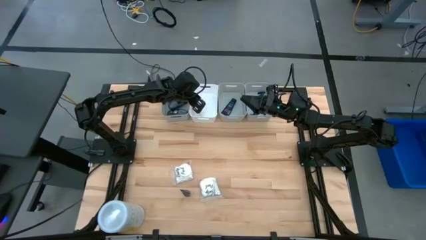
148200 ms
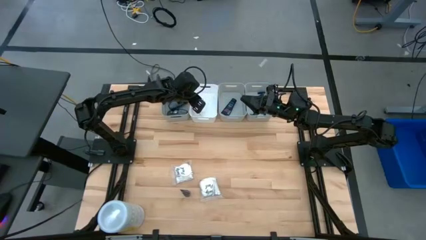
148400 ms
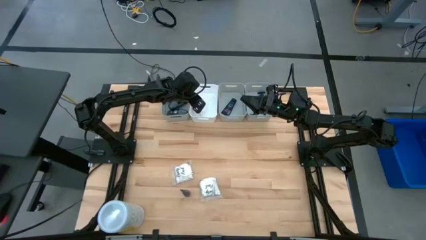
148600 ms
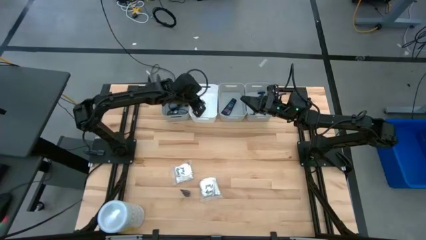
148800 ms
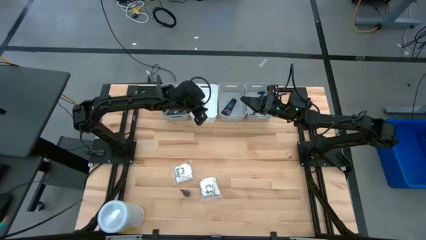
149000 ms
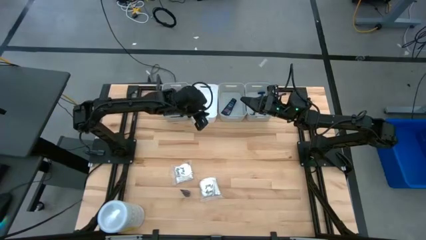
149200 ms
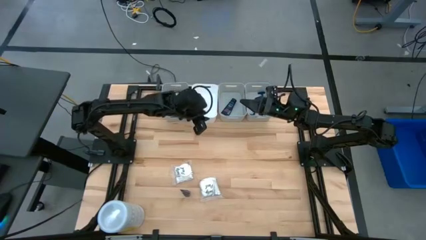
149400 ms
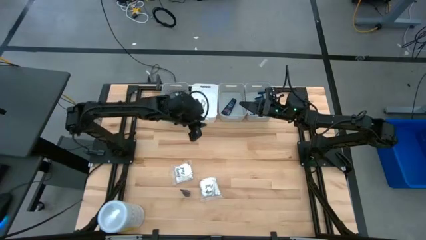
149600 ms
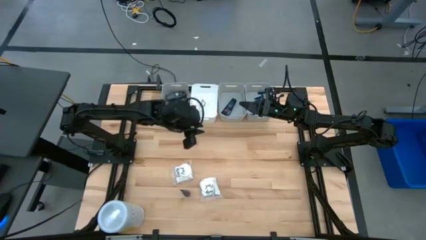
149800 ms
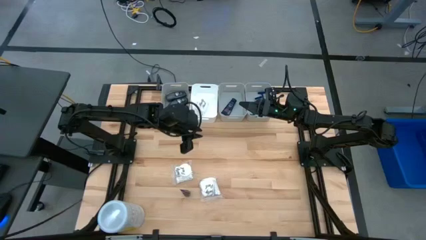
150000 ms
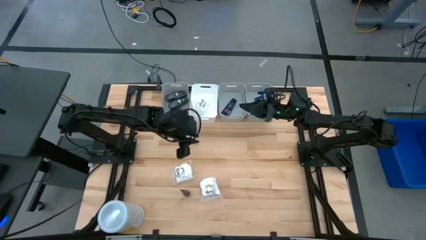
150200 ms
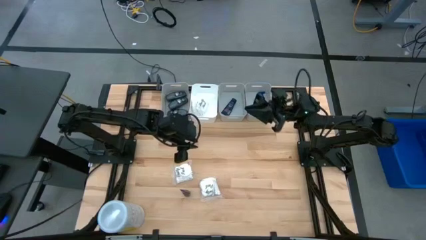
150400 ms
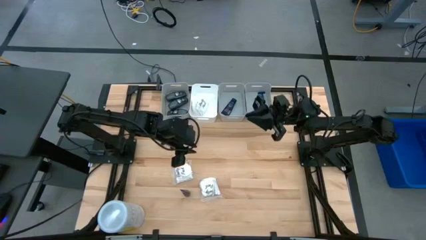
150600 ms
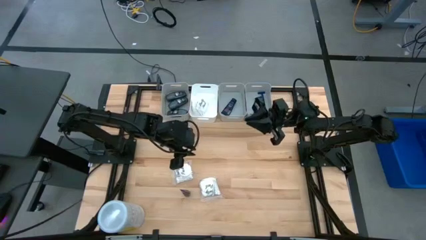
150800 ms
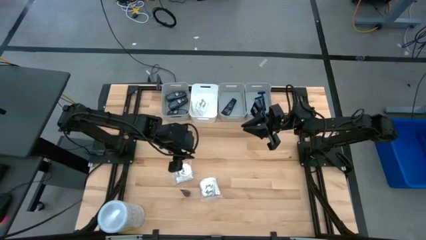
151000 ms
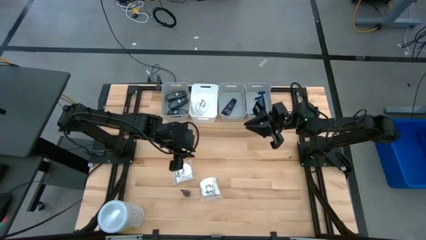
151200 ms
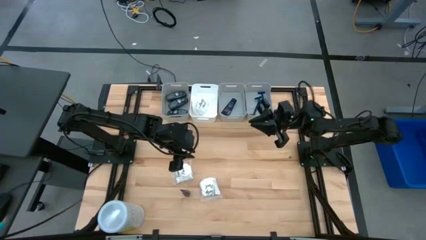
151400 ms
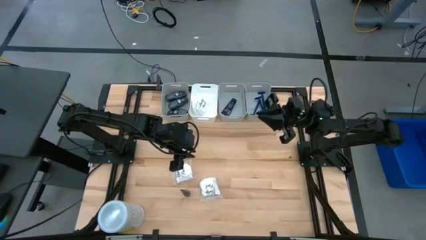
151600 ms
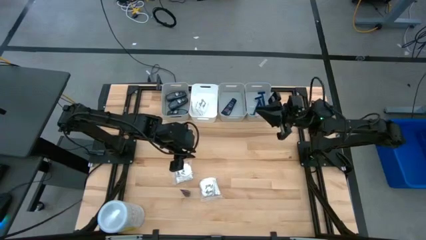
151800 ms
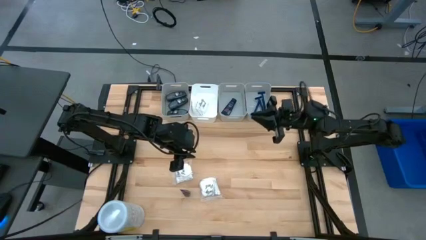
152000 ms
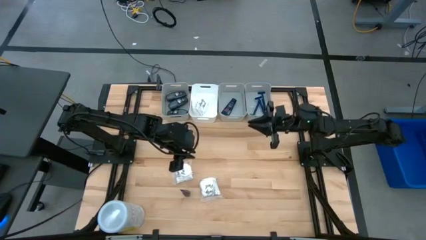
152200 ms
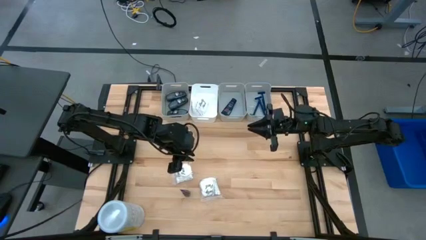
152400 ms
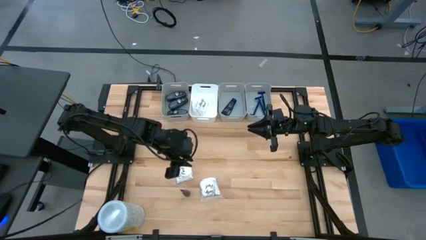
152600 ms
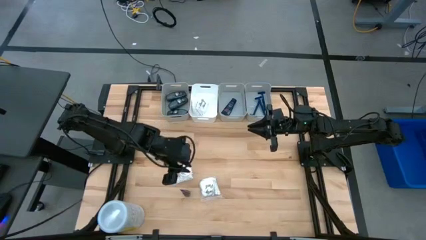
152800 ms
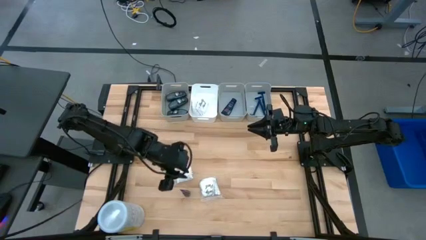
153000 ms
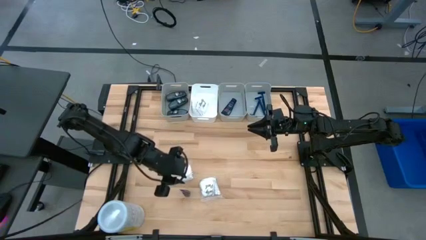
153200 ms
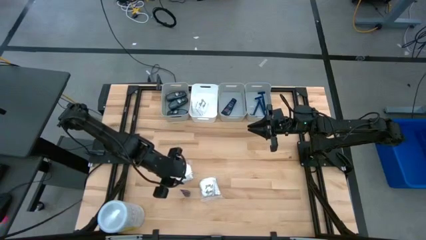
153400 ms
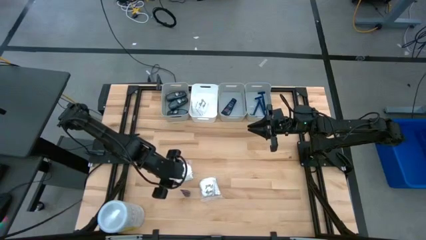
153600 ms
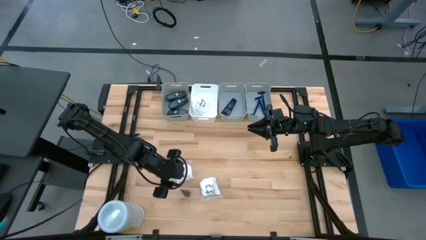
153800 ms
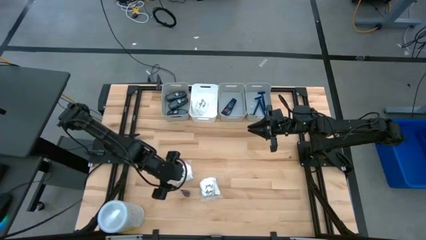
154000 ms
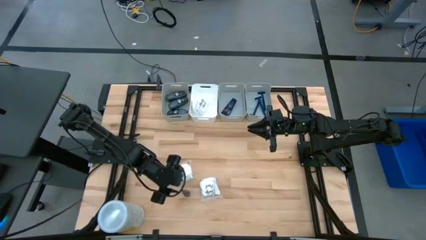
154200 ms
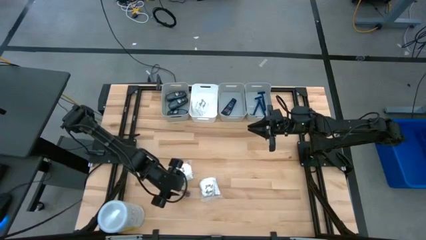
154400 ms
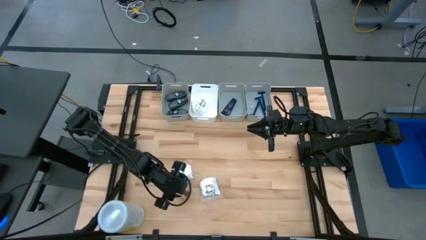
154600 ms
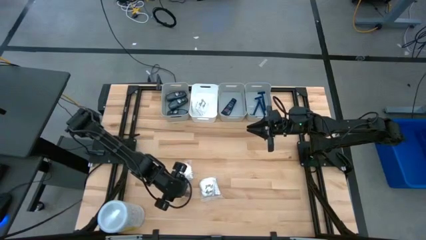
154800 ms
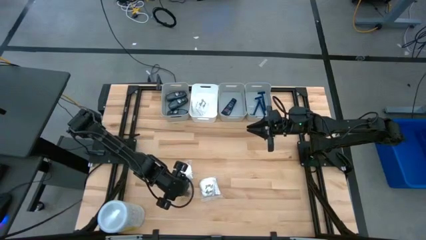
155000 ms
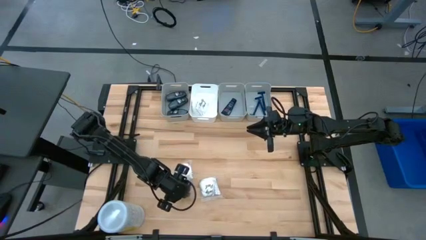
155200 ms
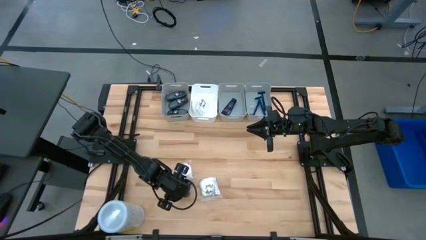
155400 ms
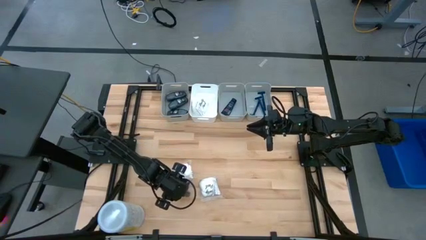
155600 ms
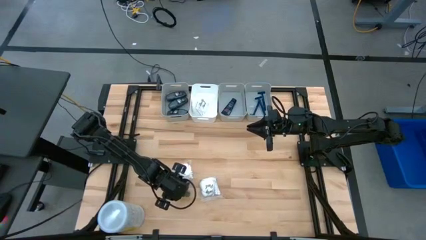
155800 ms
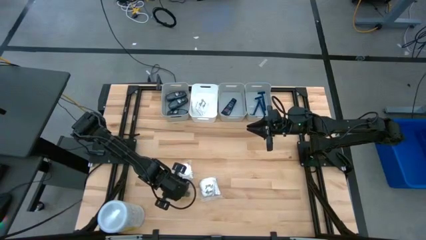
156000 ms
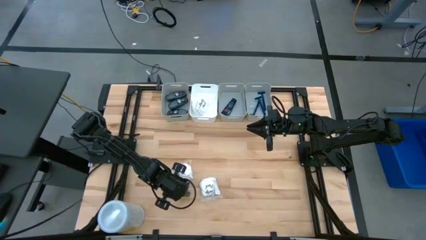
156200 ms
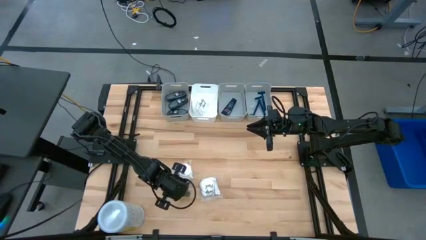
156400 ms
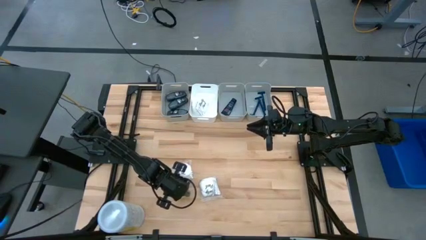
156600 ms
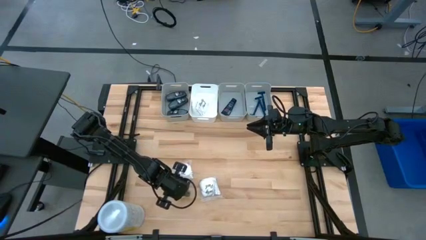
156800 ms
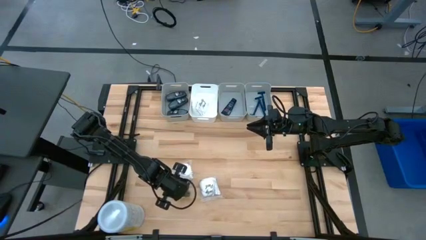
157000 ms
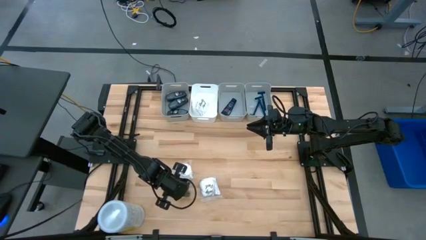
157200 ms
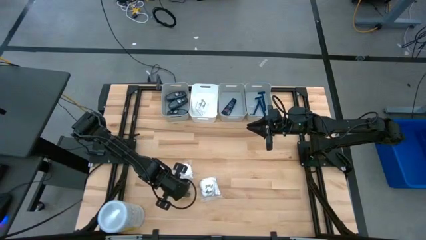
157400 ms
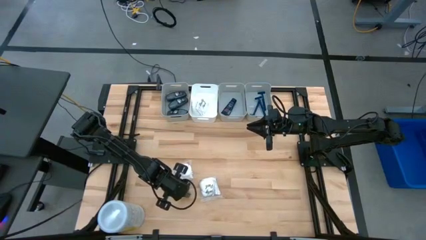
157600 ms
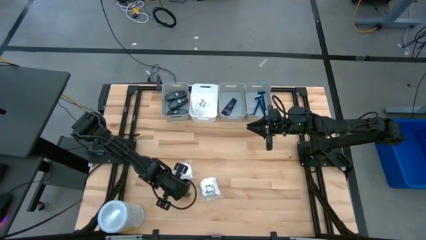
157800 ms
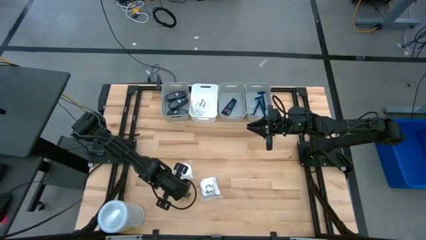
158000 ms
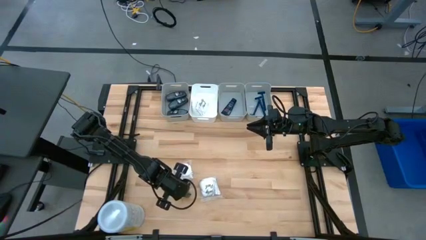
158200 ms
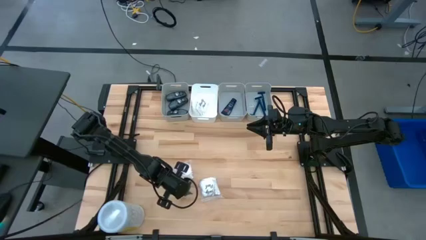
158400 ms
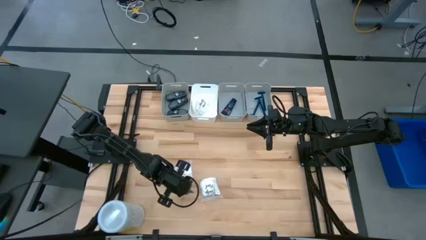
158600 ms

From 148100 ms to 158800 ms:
Task: Pick & Place Travel size toiletries
Put the blue shave cream into the middle gray bin

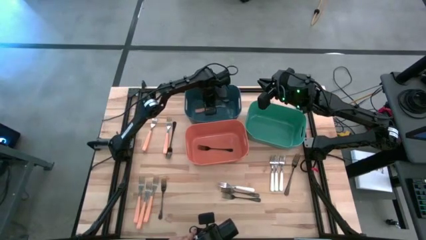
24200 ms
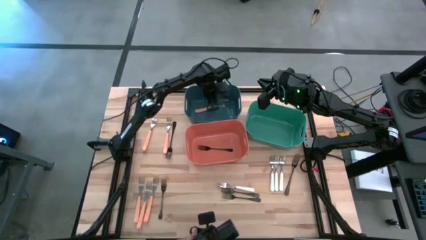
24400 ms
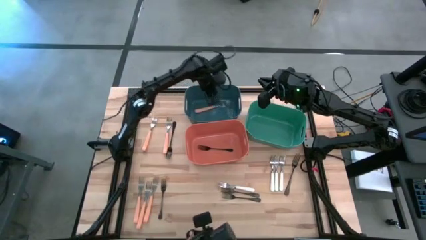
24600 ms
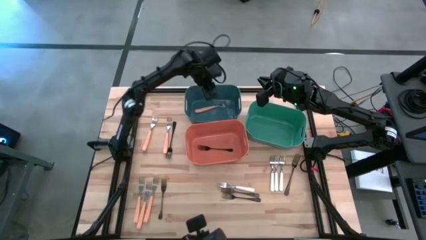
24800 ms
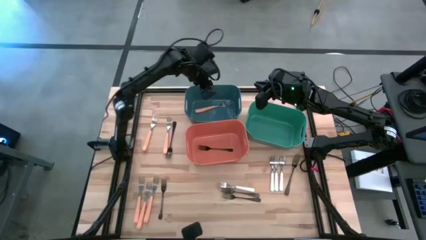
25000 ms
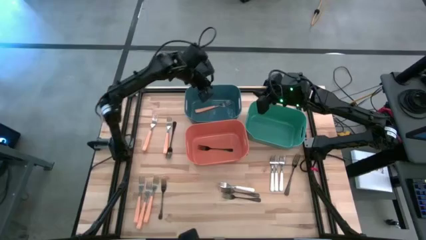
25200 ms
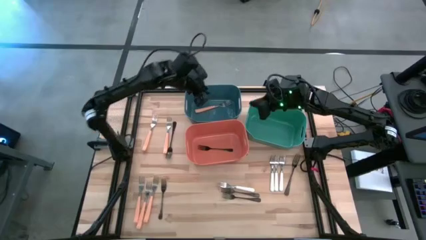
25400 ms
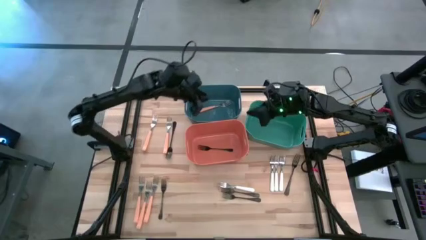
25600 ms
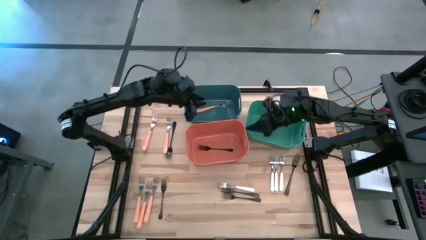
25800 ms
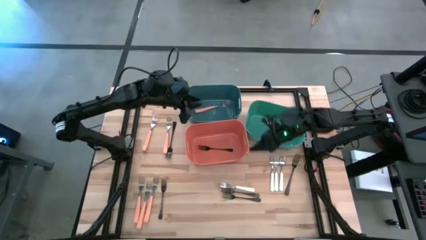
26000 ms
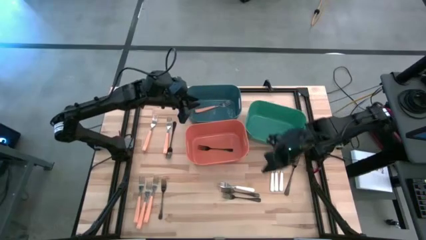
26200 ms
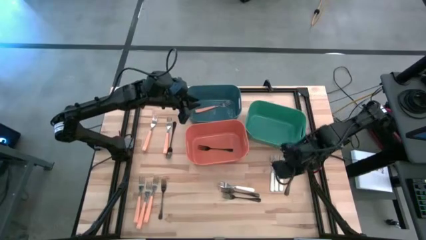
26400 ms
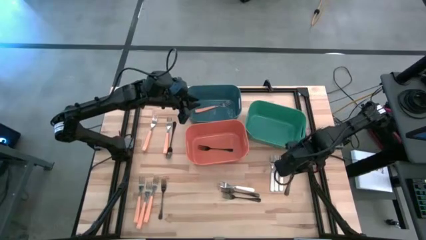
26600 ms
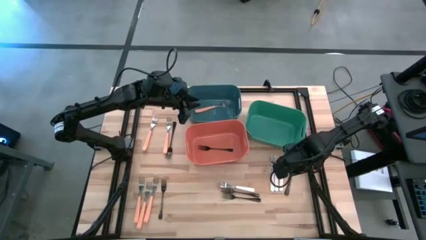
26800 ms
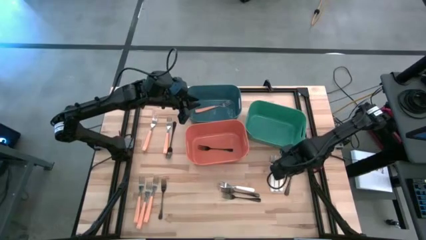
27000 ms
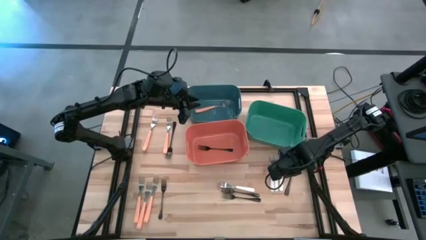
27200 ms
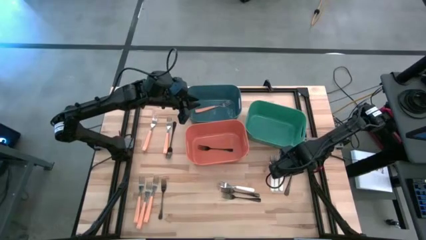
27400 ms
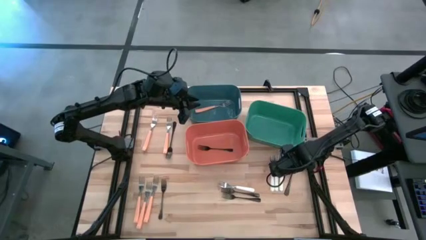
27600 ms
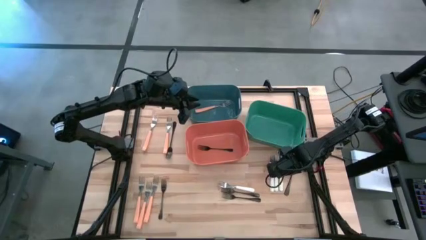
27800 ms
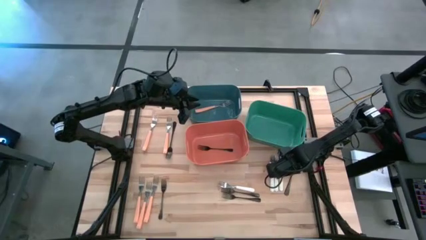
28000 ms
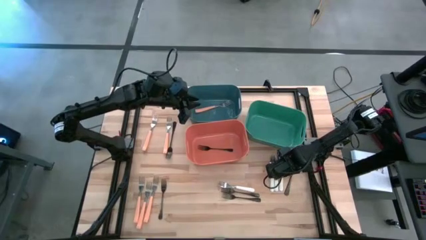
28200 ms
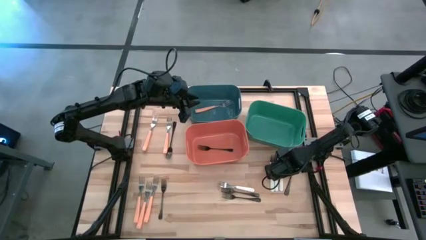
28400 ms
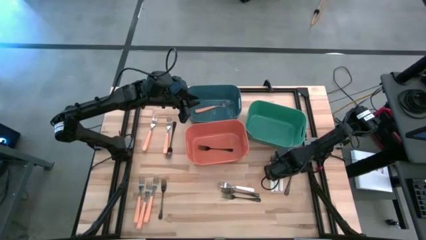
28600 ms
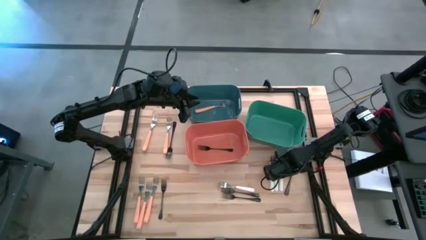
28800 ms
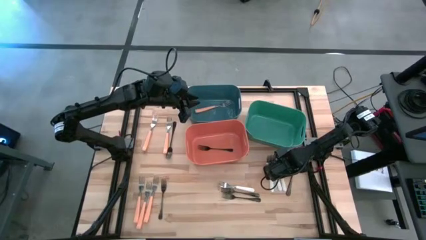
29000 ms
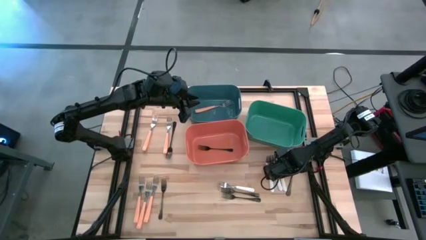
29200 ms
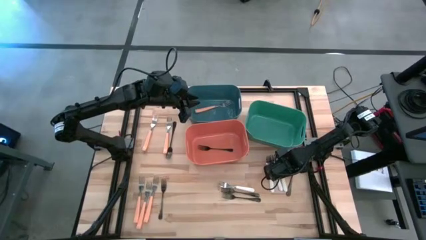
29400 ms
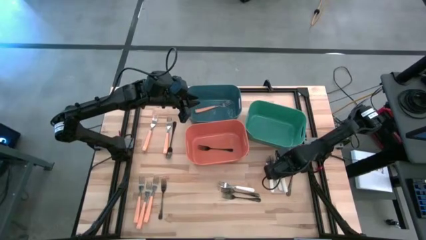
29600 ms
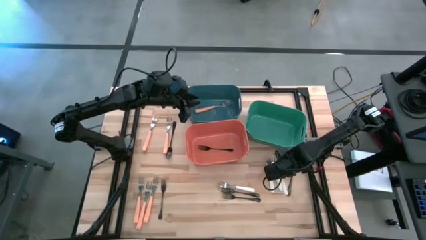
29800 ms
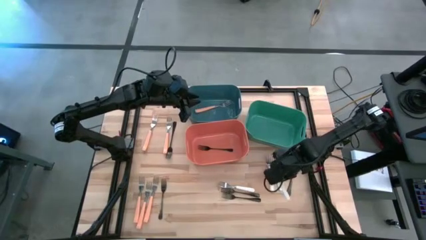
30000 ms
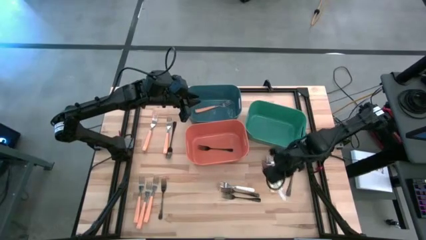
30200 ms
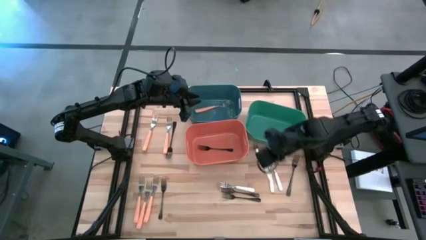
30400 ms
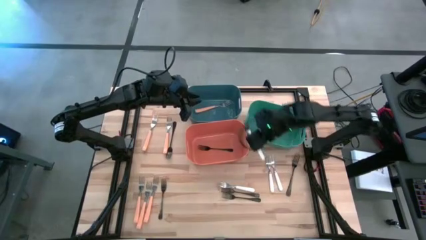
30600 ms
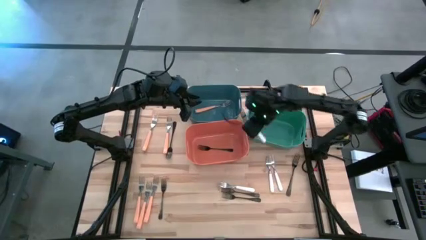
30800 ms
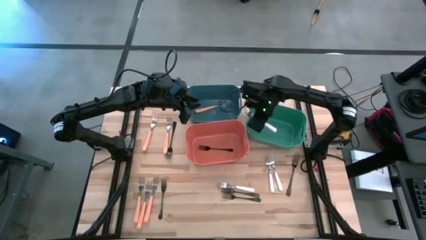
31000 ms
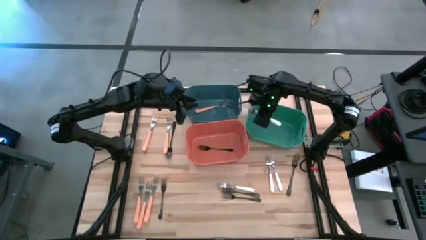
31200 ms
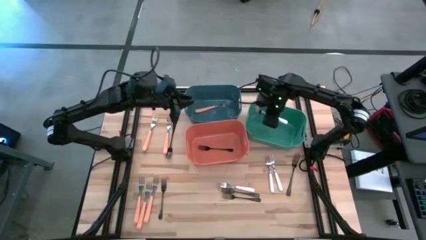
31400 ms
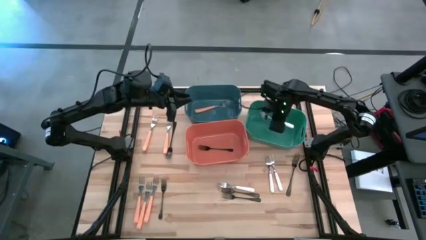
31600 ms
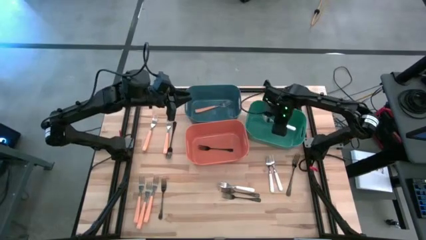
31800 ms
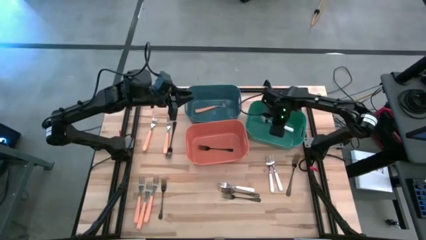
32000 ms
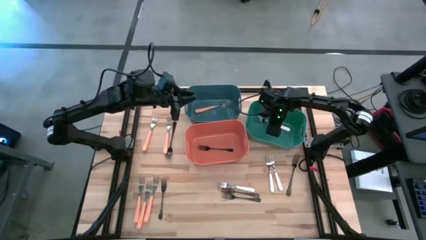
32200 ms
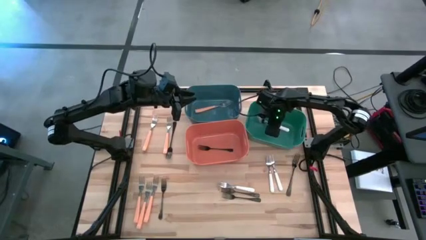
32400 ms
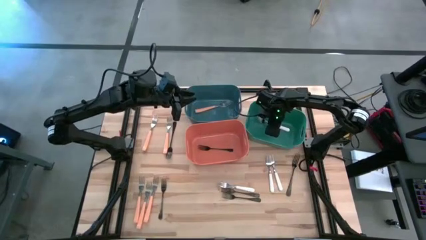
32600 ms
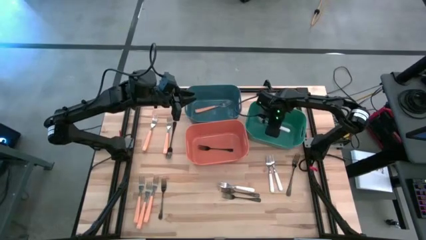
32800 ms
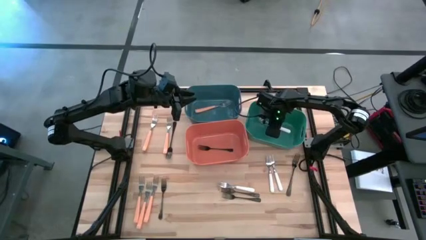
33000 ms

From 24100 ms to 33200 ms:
Task: Sort silverware by color (type)
Put the white fork into the green bin
